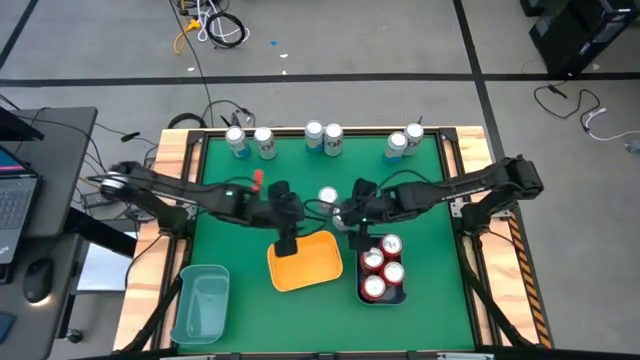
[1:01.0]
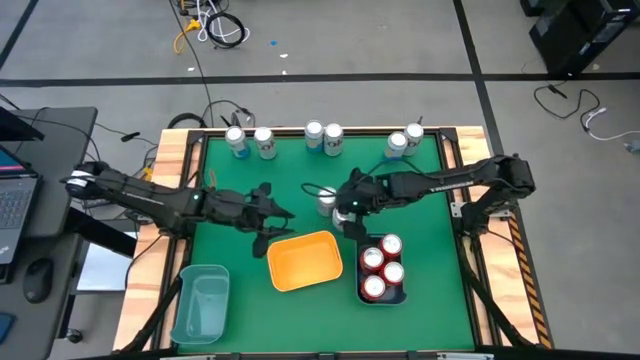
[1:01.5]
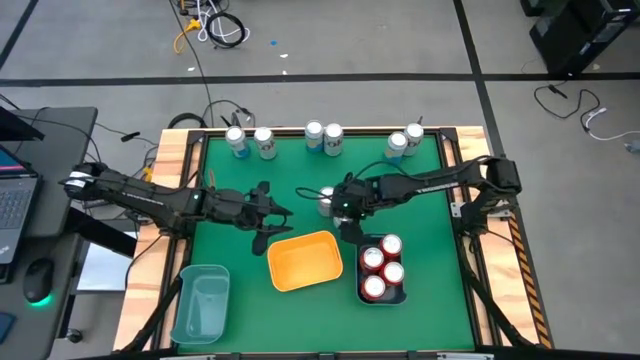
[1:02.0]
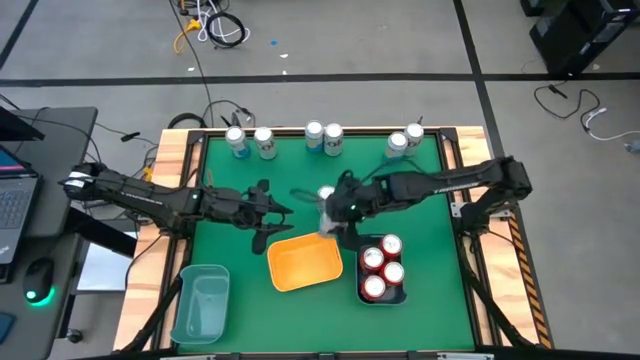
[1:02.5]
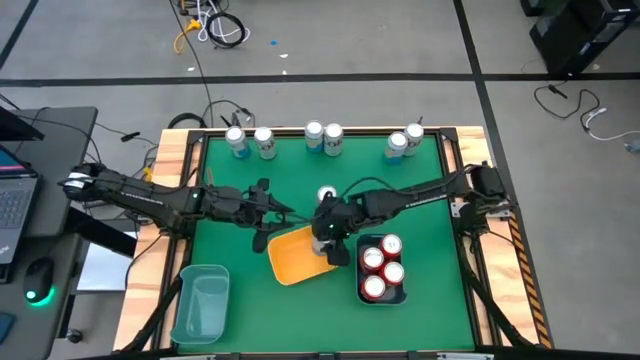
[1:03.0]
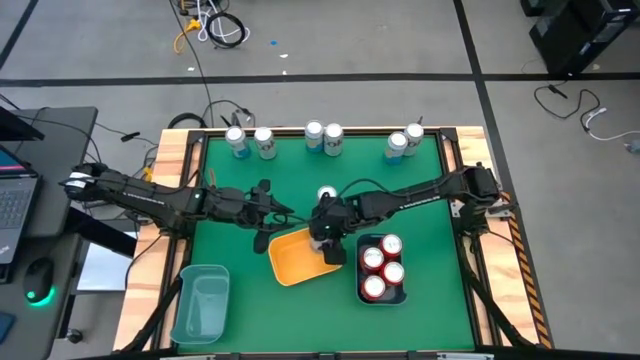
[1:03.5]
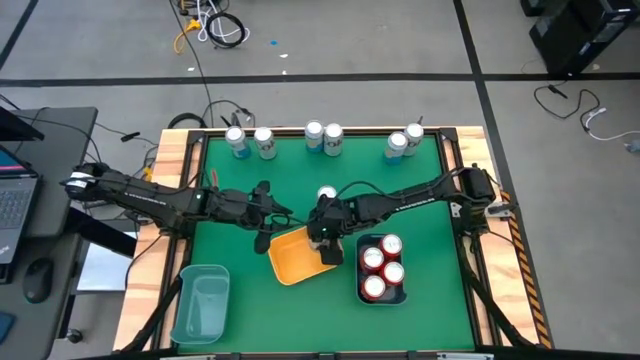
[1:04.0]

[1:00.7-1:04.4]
Task: Sort soda cans
Put the blue soda can into the yellow bin

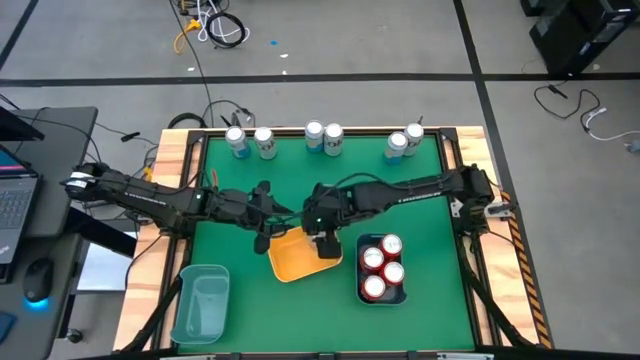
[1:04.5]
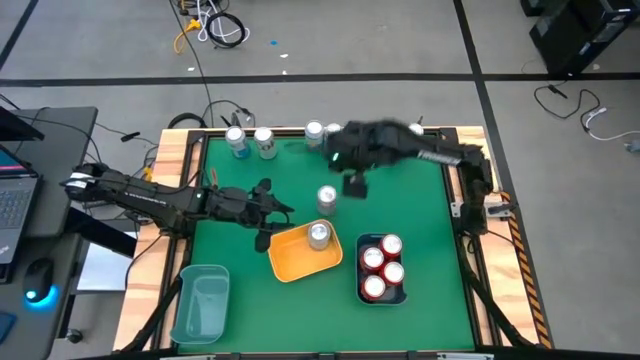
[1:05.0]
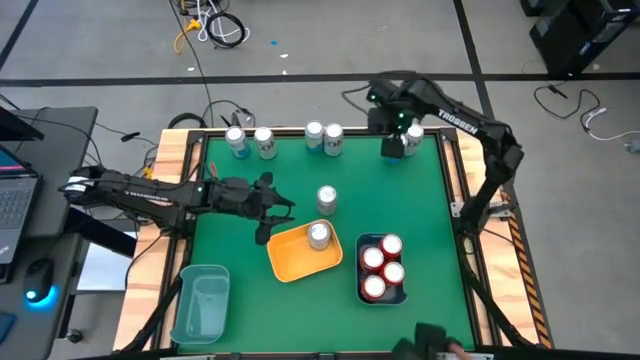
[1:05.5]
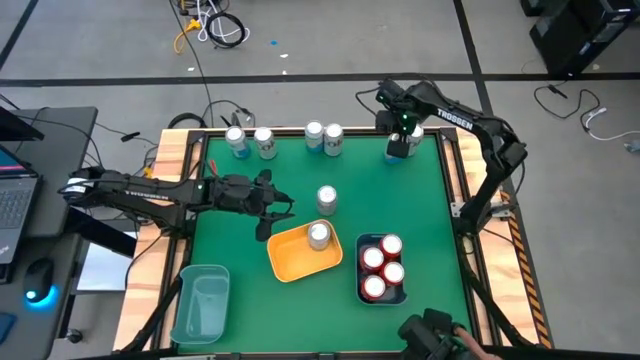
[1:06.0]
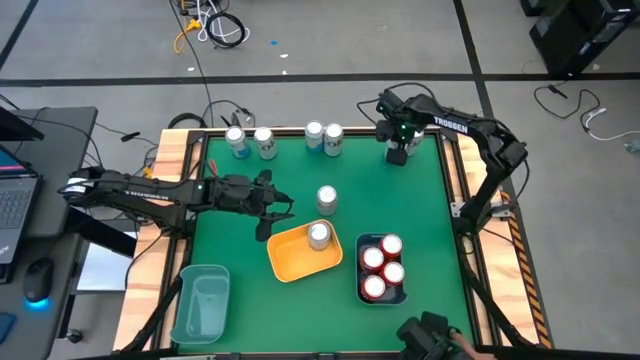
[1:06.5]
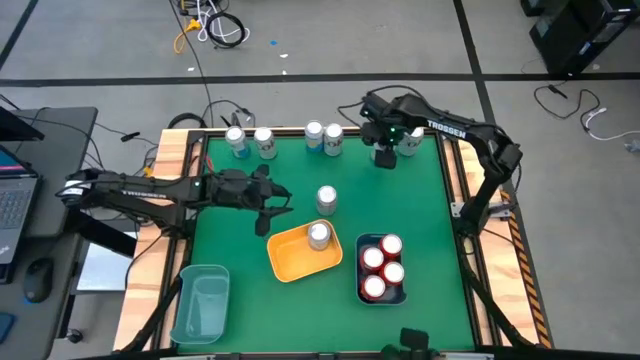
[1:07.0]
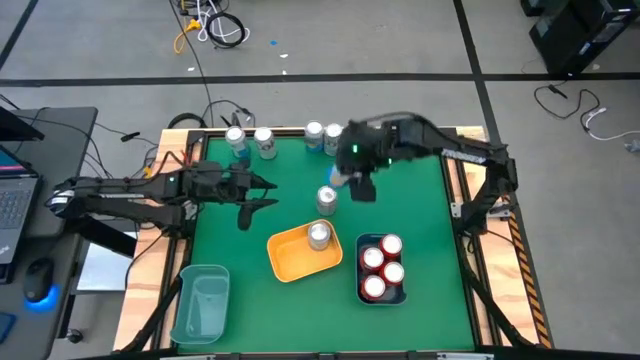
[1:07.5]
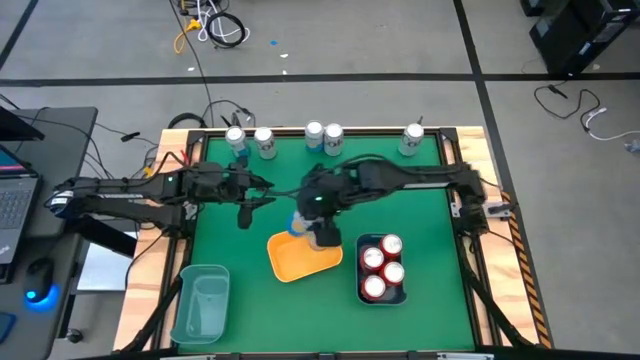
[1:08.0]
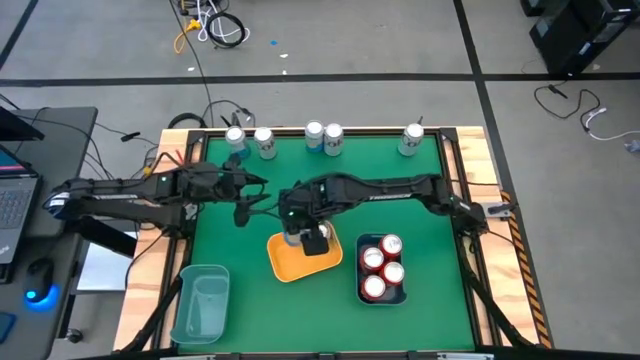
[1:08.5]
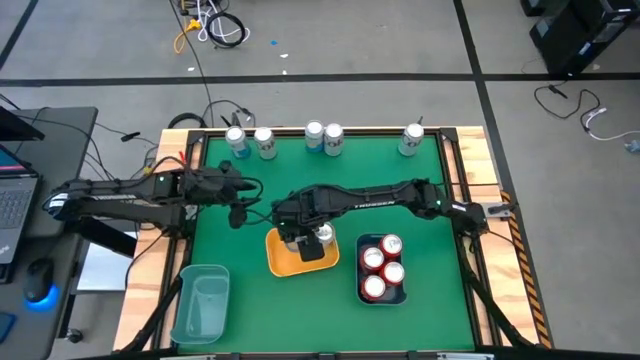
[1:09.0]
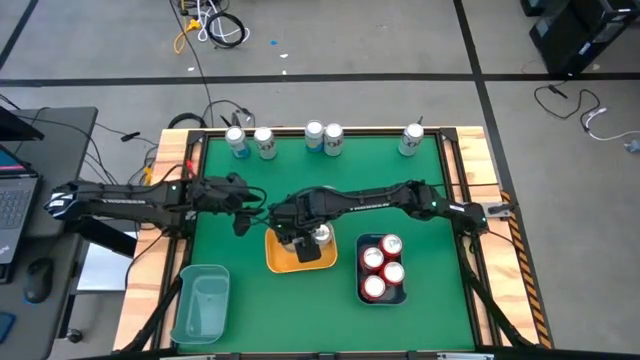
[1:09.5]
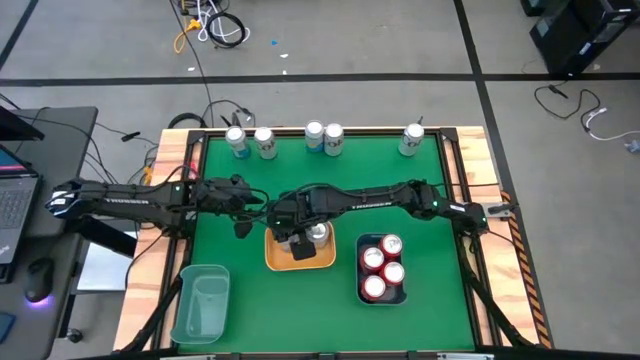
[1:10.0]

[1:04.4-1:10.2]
Put the blue soda can into the yellow bin

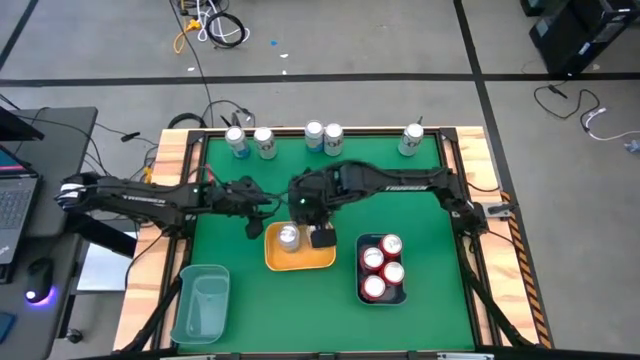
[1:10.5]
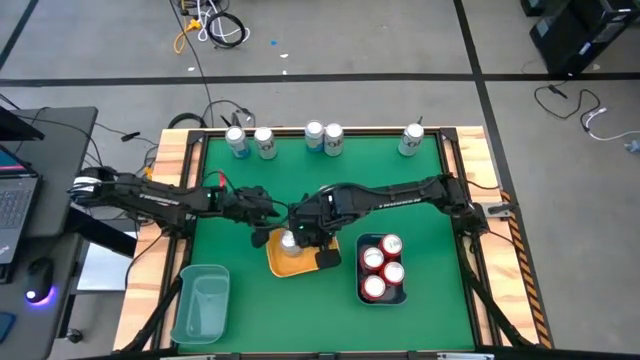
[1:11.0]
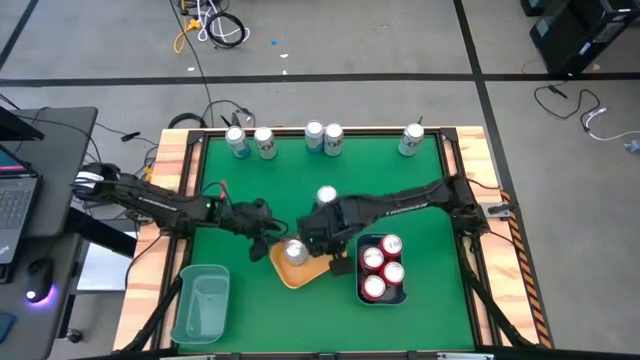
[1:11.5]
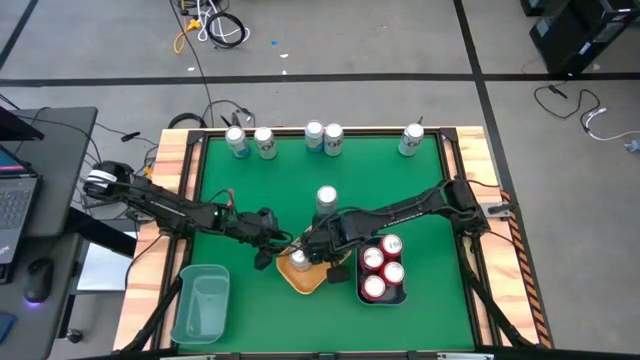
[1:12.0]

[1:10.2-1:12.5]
Adjust the yellow bin

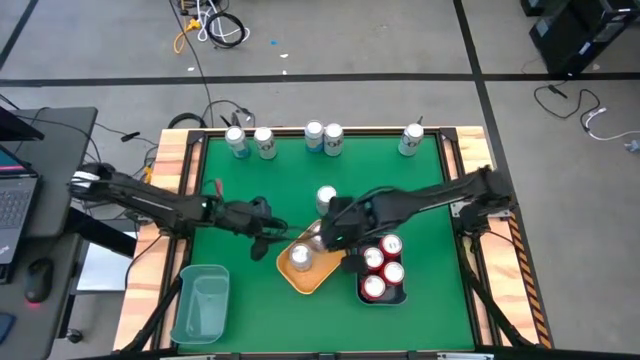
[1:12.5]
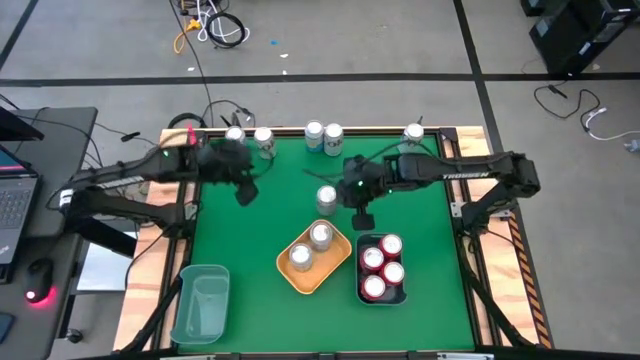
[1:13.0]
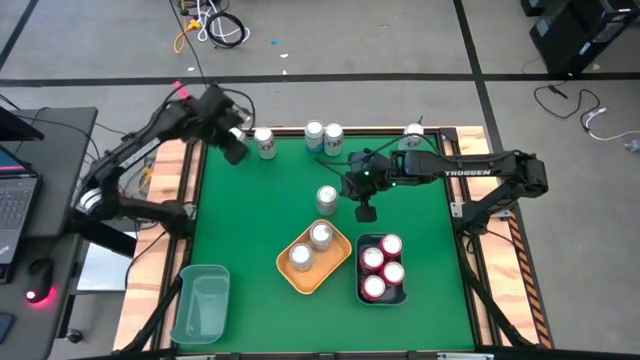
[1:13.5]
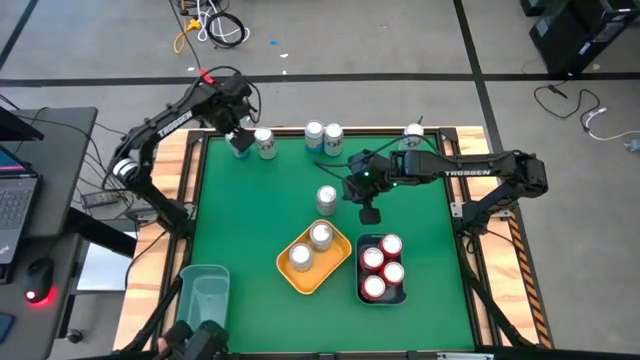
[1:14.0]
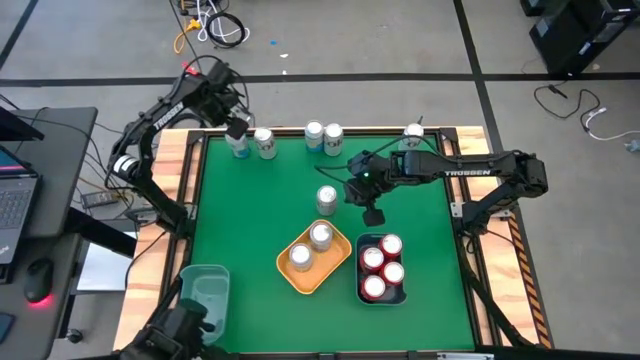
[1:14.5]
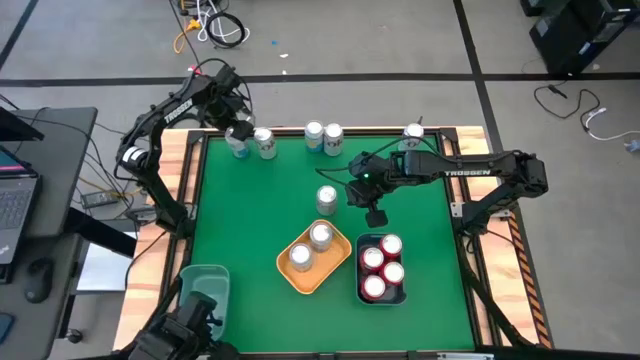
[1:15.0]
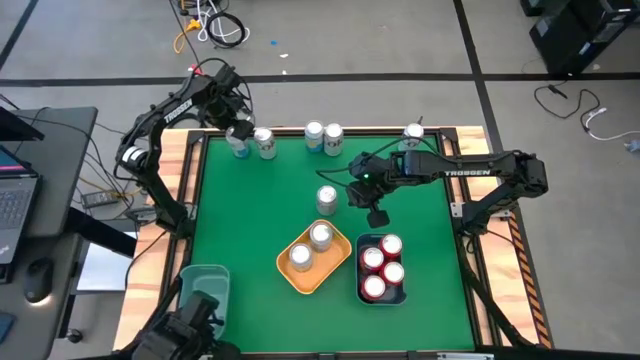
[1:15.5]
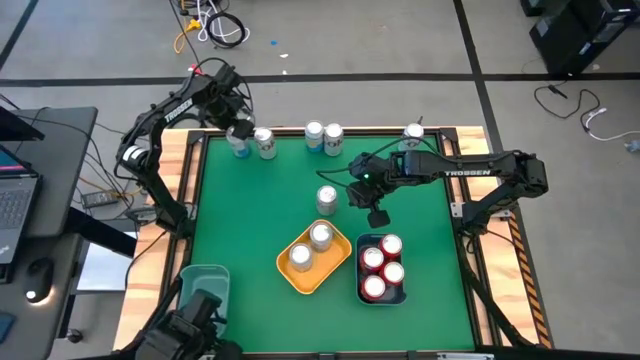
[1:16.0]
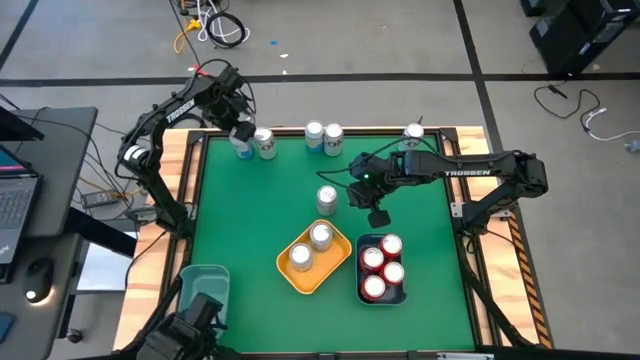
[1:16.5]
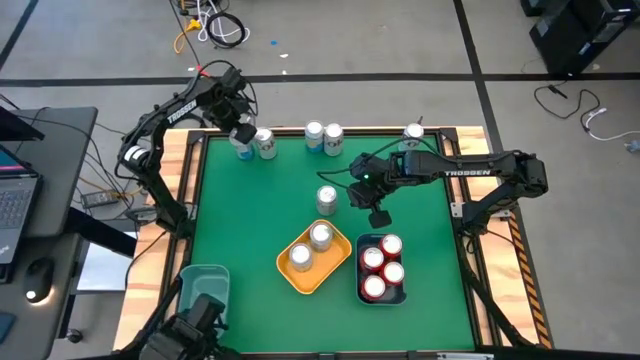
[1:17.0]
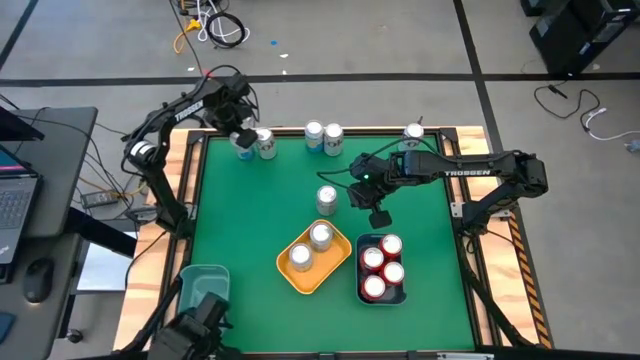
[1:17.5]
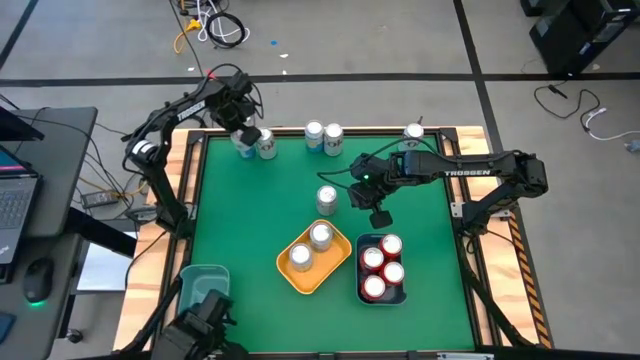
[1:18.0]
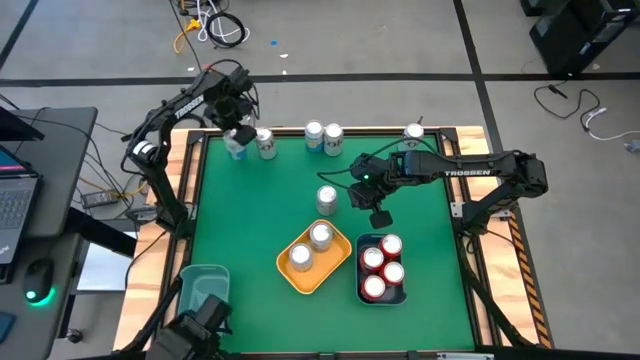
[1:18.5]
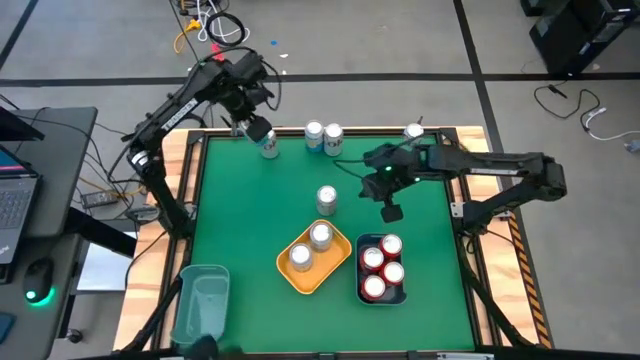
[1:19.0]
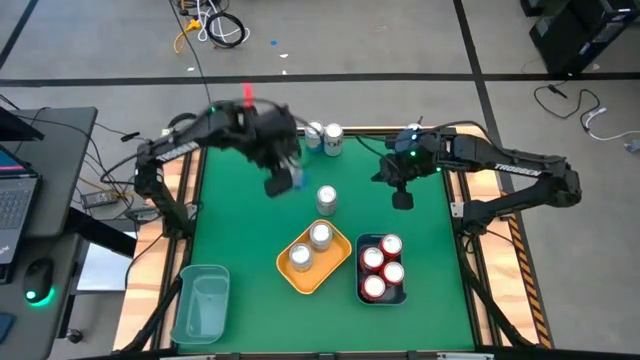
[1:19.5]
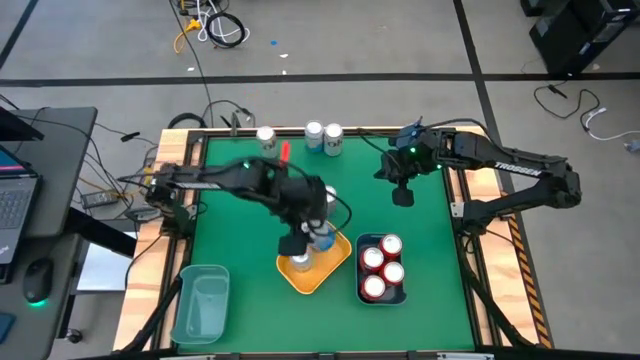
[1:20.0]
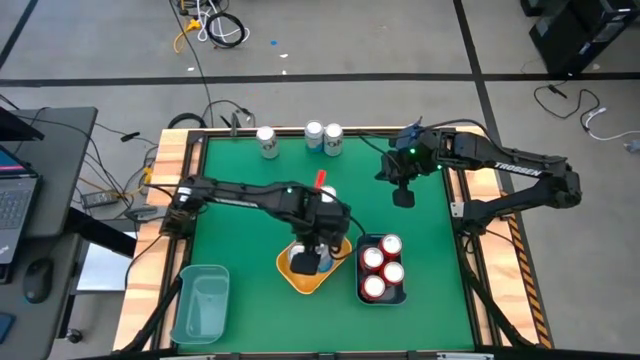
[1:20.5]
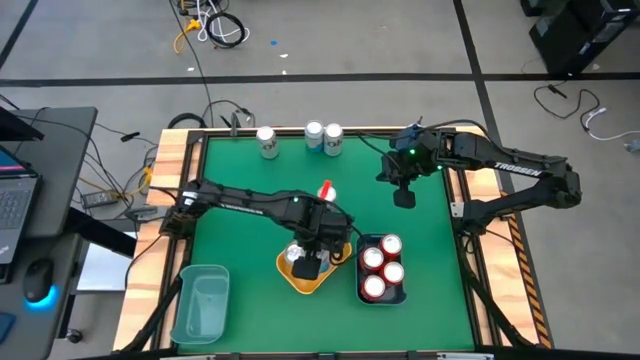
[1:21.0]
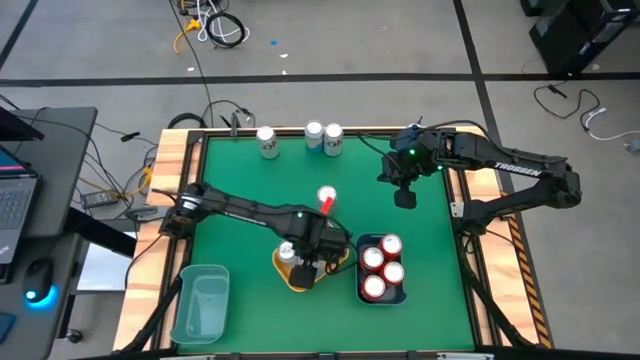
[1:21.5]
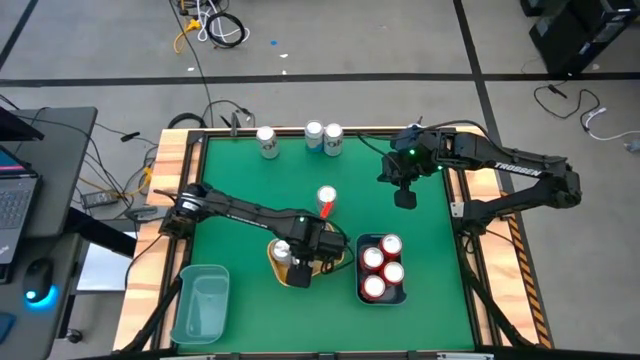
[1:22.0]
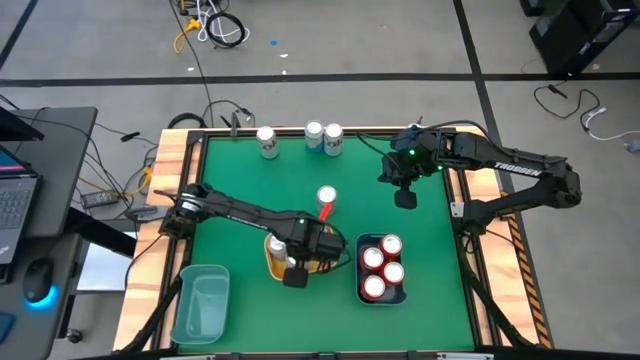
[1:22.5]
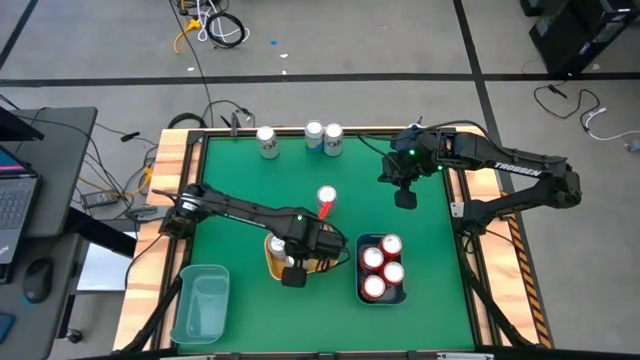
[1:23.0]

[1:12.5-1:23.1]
Put the blue soda can into the yellow bin
